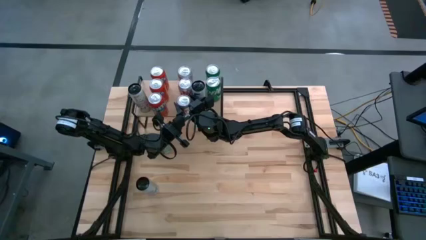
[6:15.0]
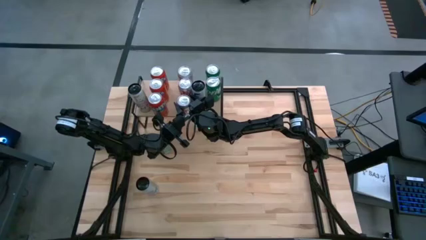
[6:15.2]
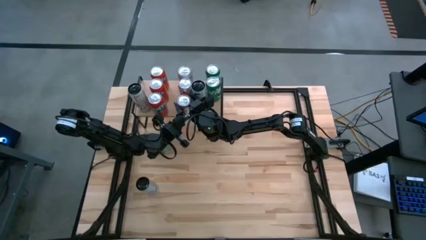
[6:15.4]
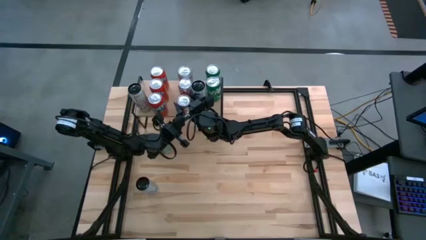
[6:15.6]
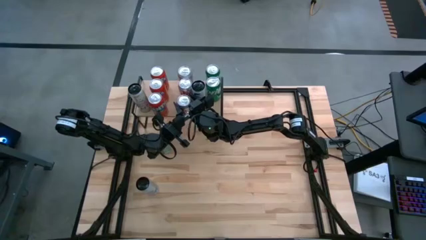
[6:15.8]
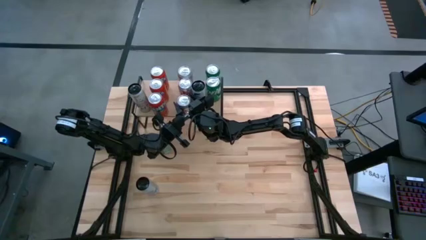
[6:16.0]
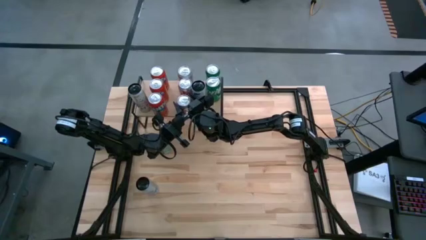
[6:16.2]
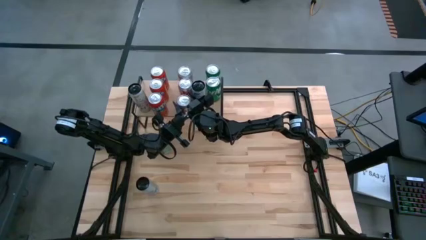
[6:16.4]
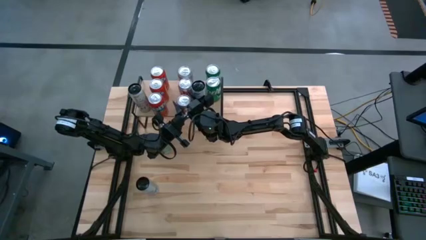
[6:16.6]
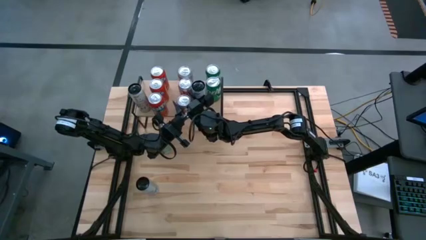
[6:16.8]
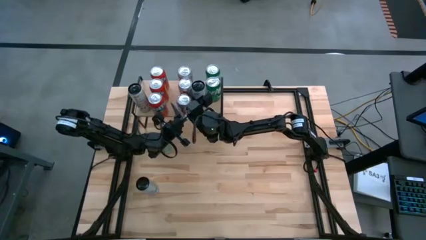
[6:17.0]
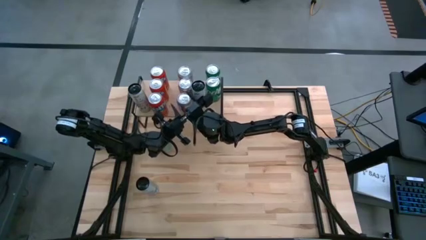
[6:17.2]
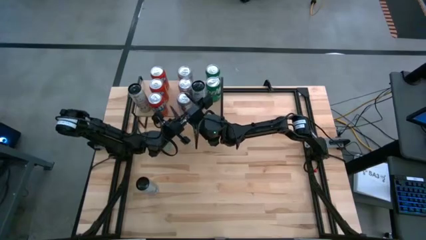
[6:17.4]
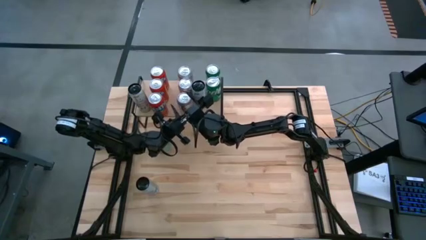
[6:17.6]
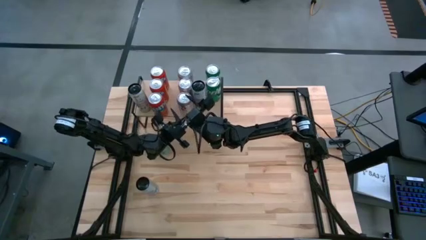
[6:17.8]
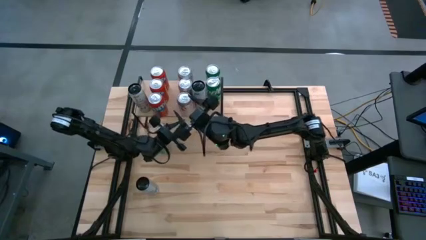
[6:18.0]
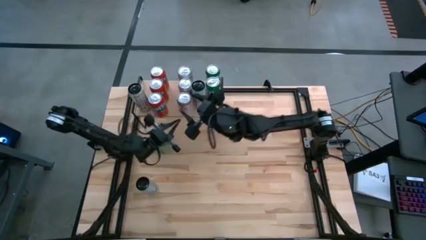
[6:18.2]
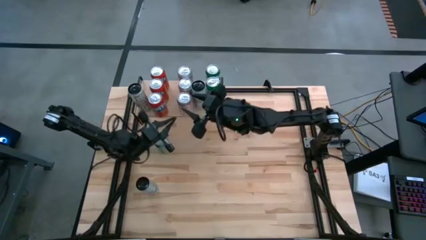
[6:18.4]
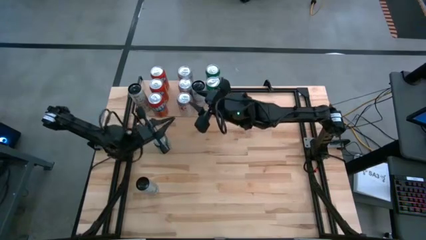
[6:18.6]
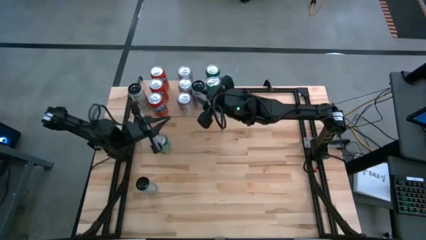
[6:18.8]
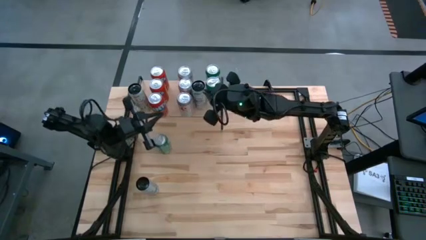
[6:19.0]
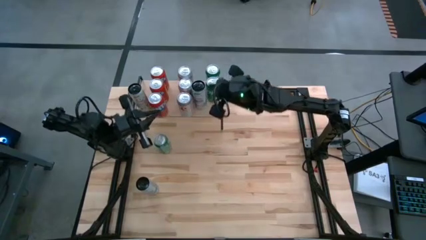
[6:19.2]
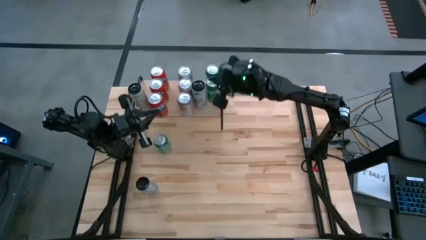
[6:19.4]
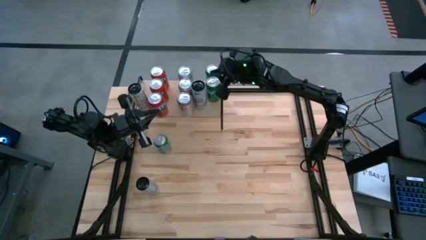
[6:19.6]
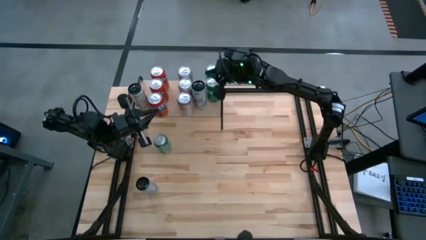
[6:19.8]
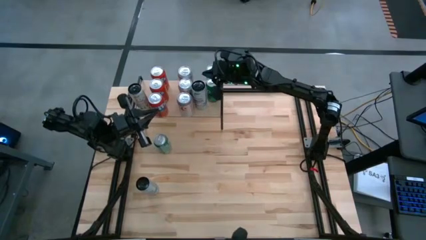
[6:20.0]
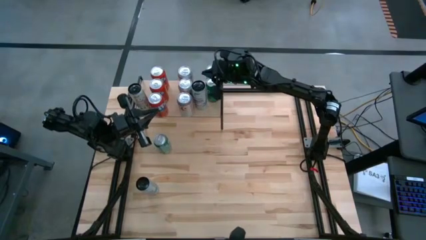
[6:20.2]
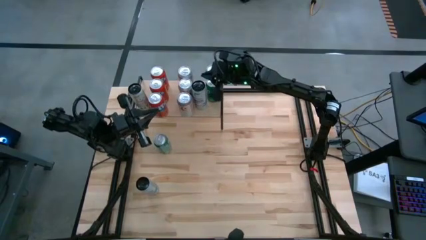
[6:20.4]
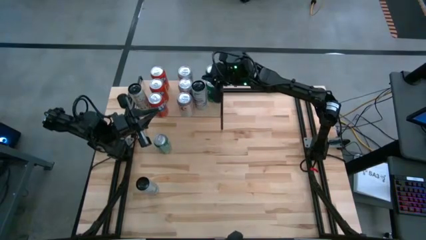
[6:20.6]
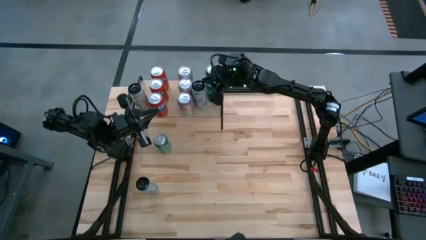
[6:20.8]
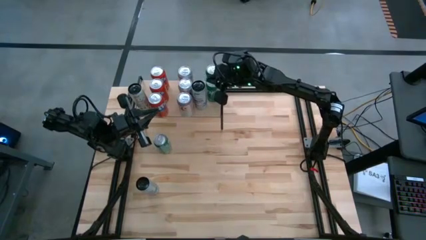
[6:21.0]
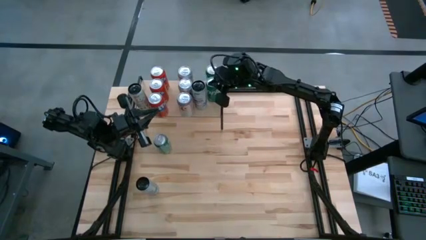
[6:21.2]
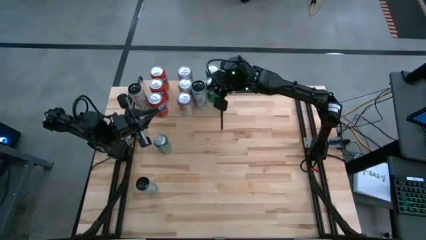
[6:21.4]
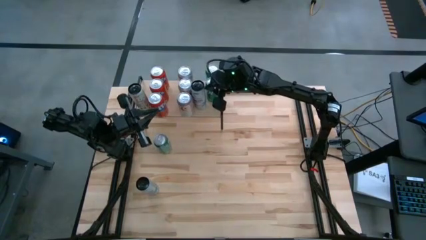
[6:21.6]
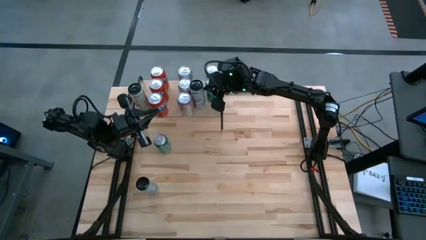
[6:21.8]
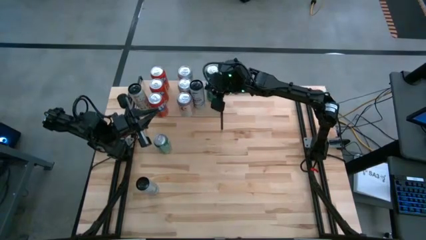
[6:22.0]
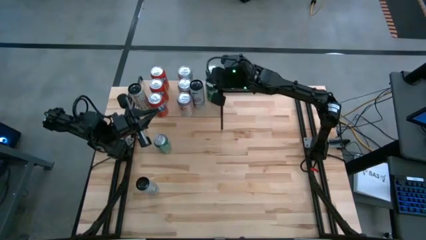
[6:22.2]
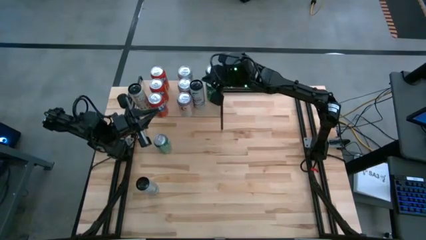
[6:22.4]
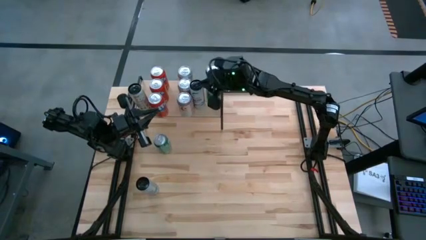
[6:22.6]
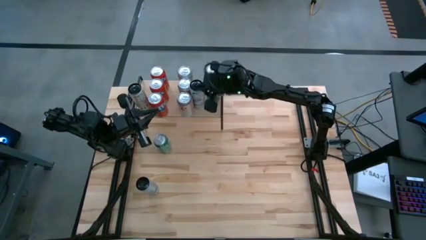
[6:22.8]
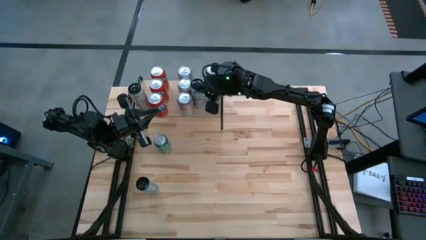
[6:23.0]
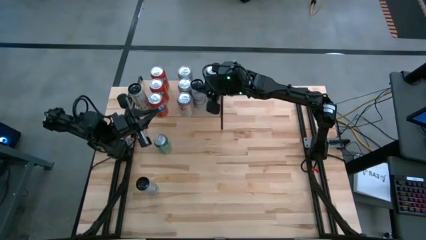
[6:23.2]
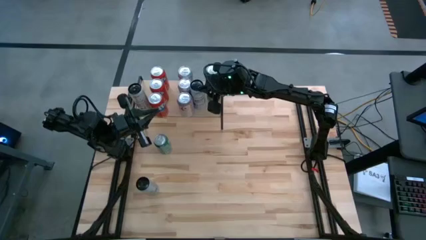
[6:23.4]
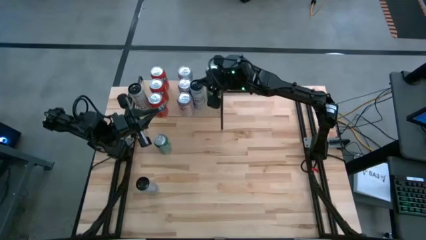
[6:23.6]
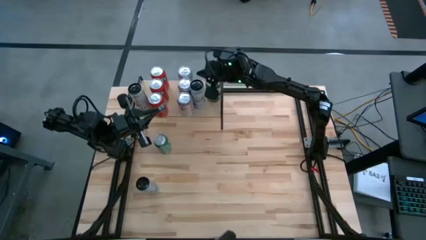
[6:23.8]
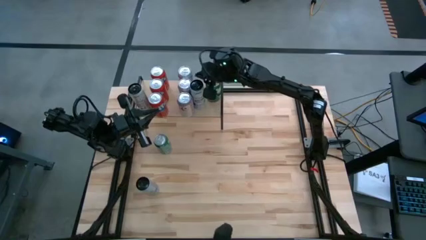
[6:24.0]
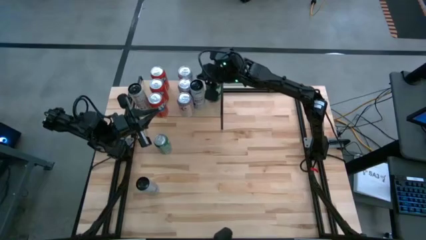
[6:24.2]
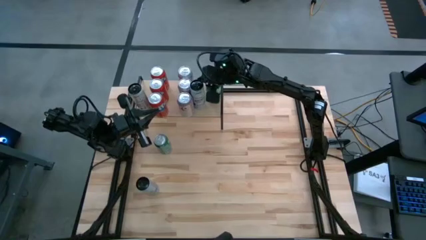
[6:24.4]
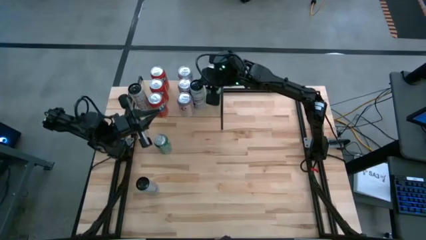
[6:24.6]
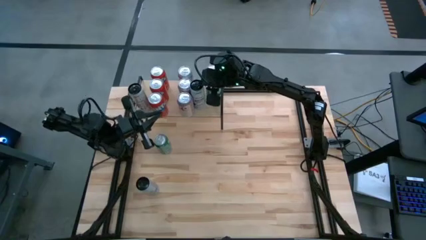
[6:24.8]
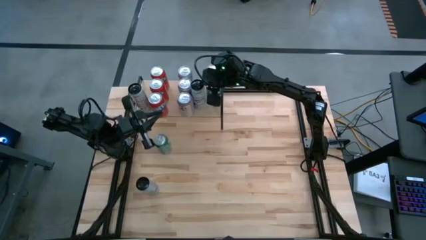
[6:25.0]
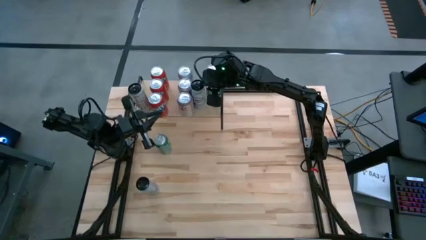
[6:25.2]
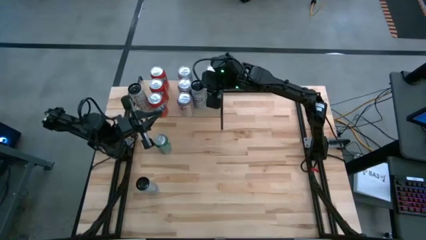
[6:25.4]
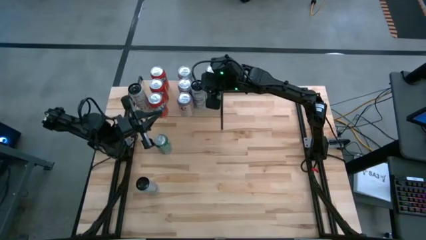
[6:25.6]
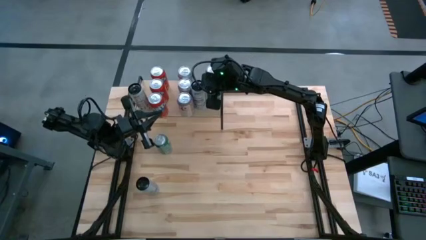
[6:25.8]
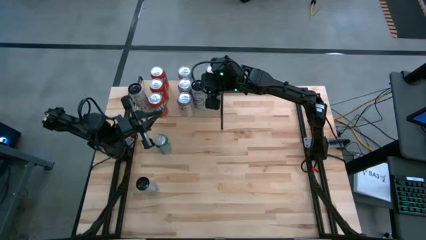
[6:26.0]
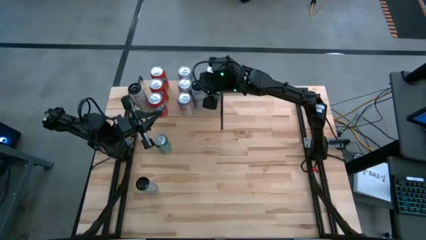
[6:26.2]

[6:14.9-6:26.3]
Task: Place canned beverage on shelf
Adjust the white and blue soda can on the shelf
